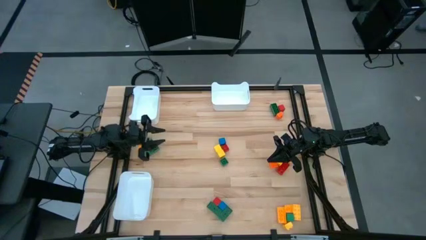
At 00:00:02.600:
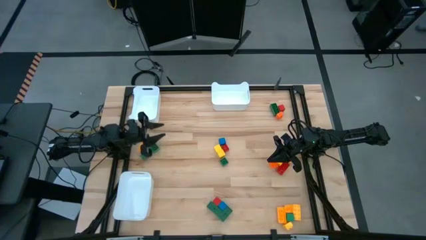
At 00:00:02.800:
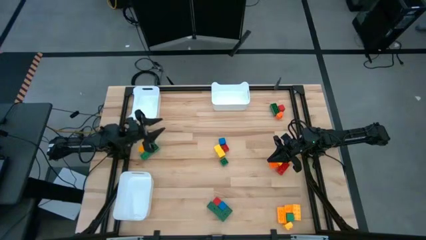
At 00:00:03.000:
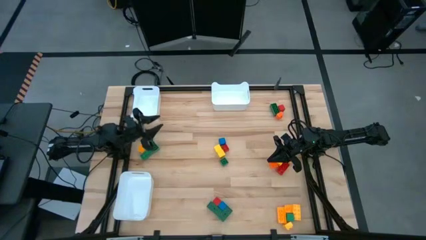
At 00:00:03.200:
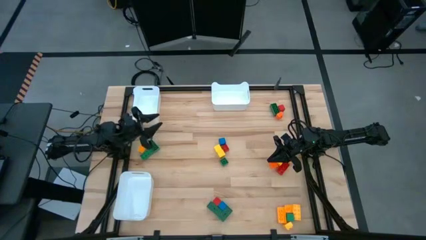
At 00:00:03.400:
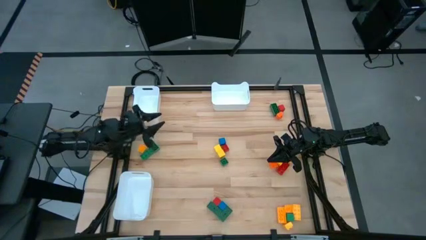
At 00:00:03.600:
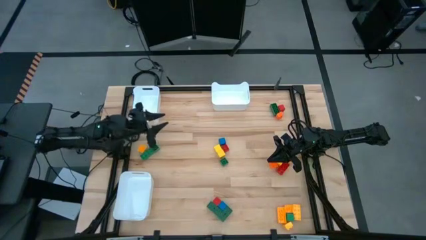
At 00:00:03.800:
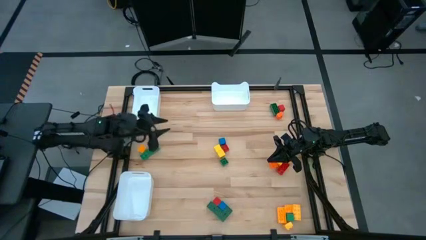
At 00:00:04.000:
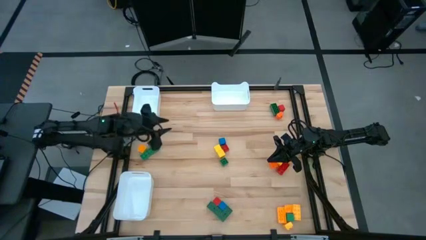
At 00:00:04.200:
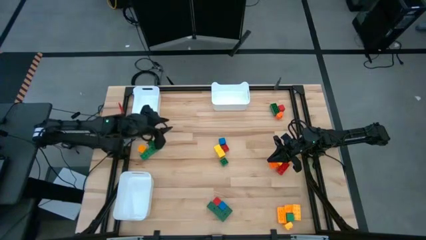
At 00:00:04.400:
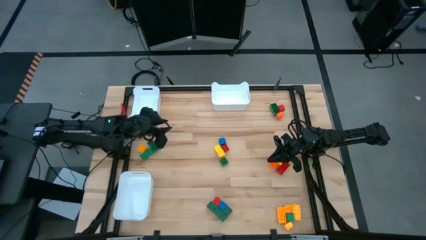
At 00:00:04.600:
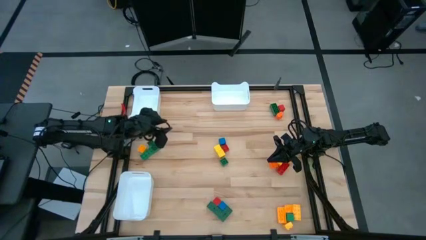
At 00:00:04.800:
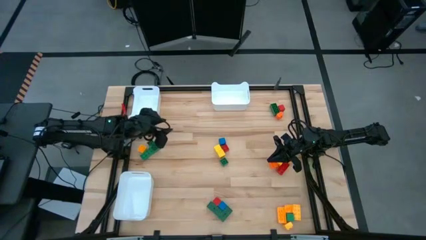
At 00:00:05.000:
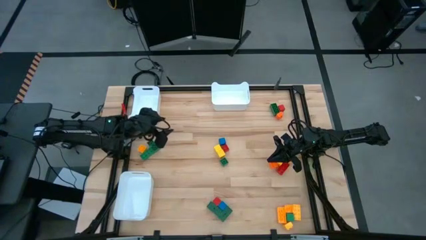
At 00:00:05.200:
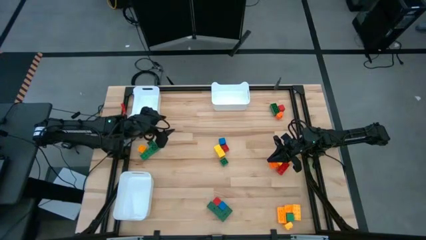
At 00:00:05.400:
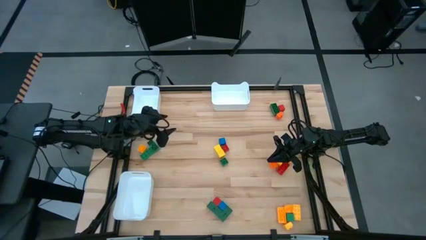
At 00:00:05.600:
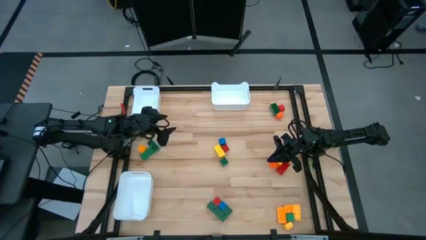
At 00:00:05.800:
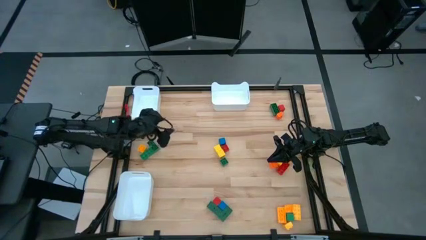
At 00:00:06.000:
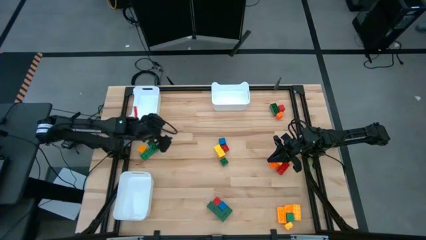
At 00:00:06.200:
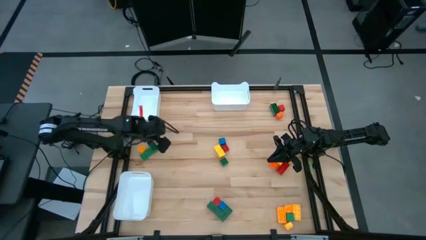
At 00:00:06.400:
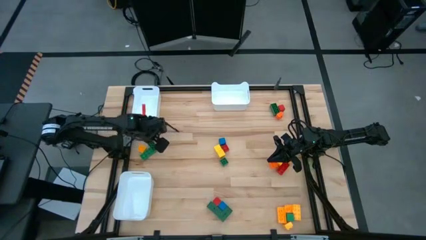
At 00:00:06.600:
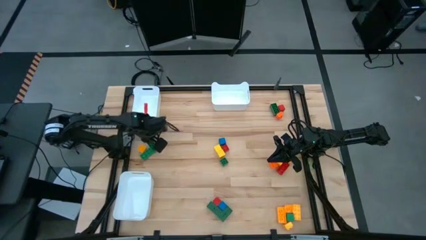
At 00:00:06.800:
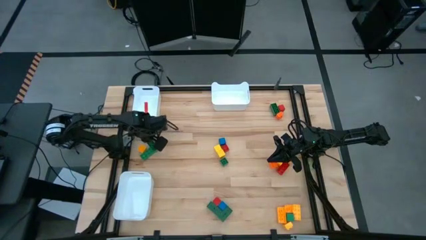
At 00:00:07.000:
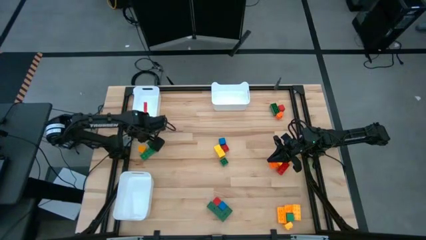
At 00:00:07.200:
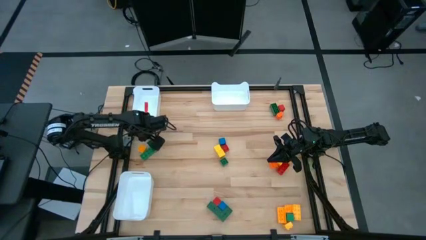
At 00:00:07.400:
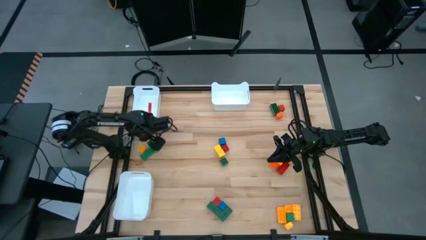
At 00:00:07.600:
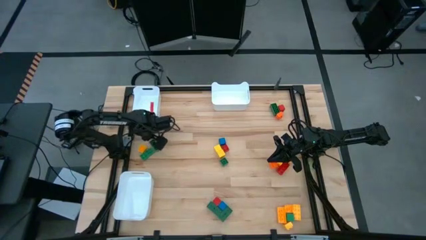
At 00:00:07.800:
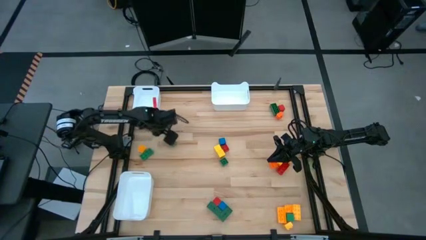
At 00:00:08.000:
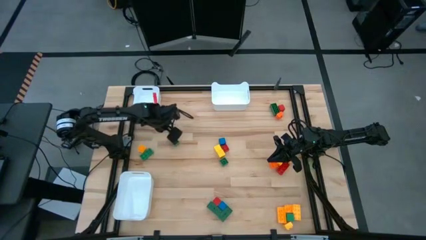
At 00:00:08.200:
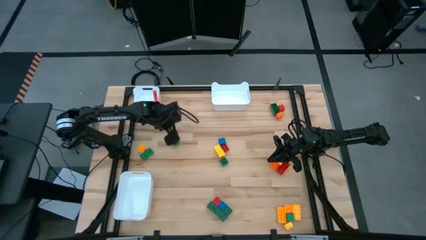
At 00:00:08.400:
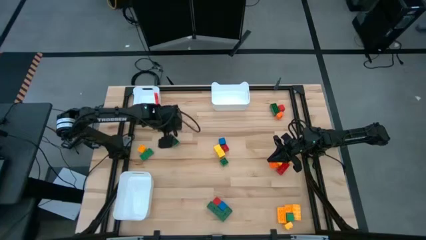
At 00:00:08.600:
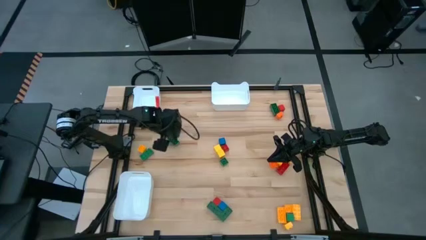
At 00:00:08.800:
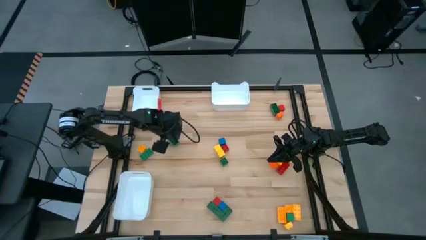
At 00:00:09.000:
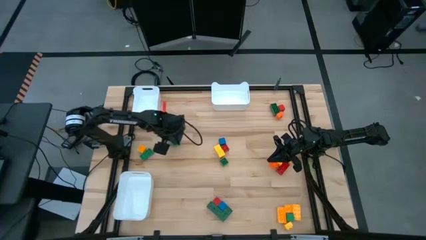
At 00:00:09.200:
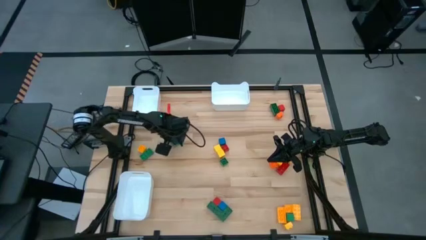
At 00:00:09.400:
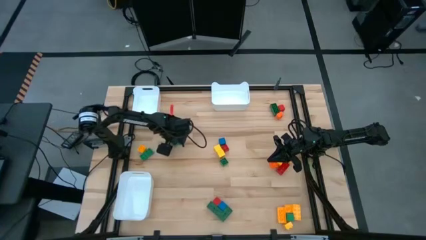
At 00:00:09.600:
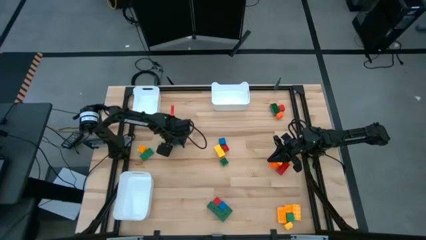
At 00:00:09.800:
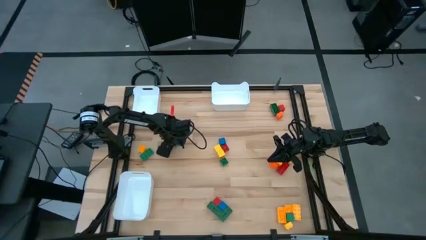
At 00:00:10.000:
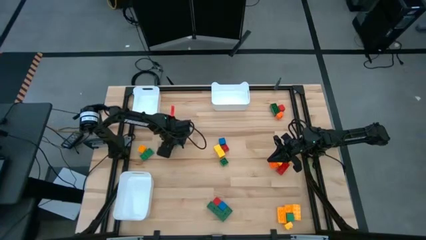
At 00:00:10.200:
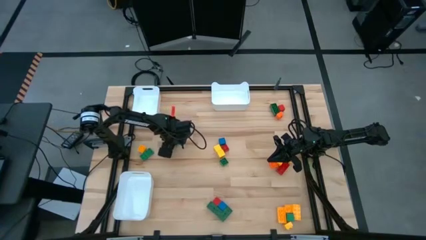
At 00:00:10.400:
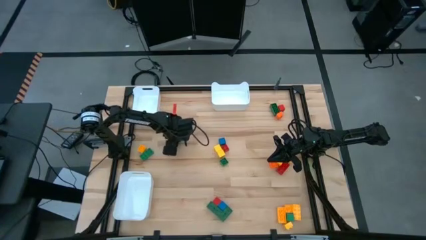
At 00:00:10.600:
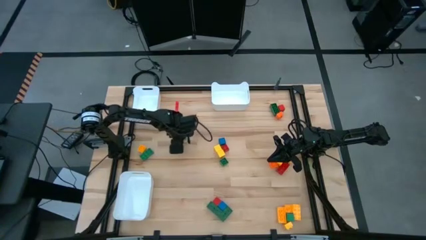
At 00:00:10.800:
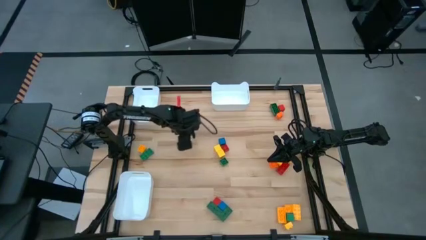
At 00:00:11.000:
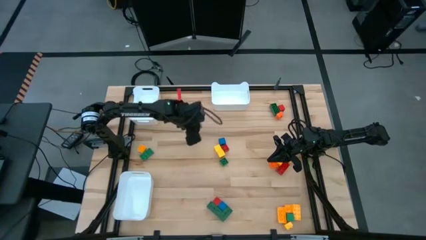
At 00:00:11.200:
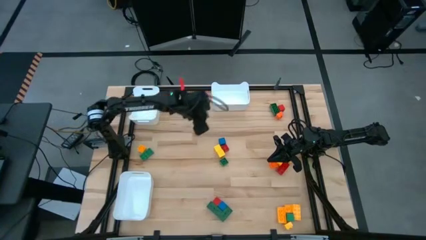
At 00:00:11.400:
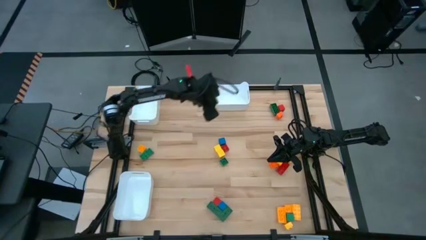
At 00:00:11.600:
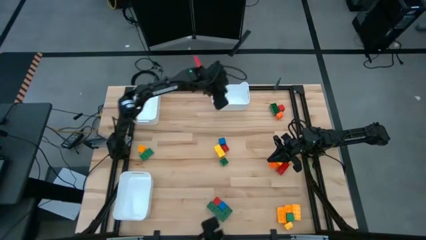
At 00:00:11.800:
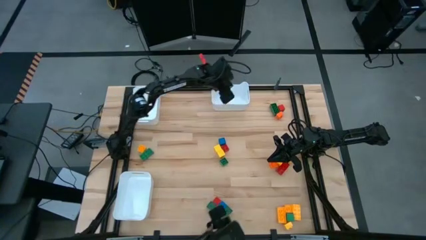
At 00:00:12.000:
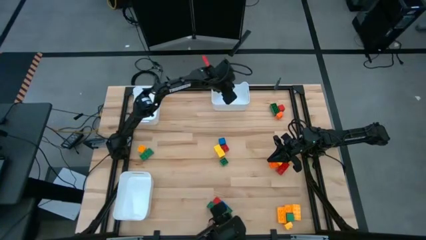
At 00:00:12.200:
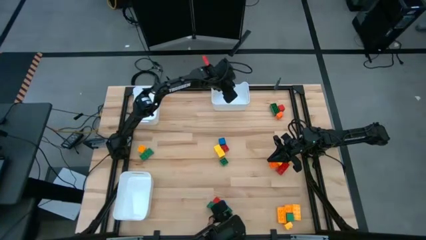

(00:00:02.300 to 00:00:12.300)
Task: Sort blocks by size
Put the green 8 stud game piece into the top right white bin
